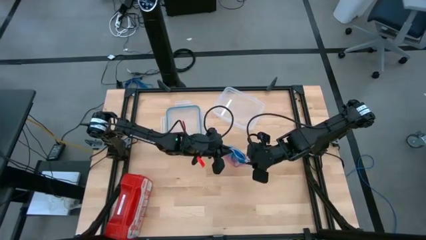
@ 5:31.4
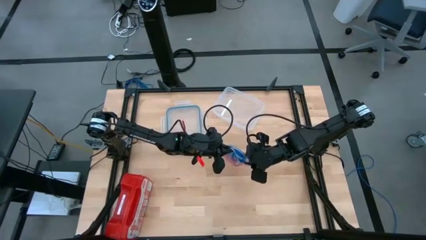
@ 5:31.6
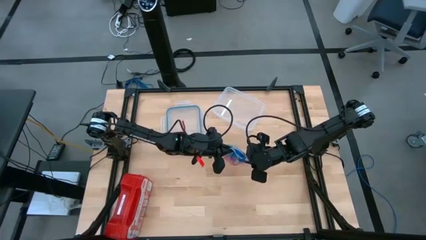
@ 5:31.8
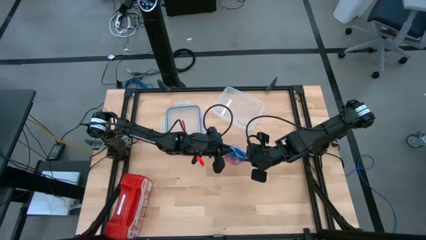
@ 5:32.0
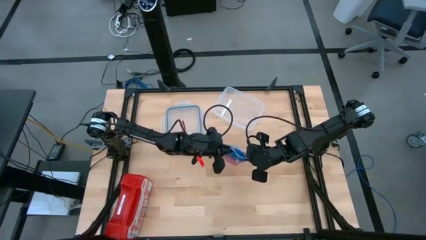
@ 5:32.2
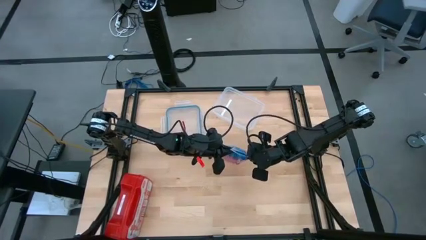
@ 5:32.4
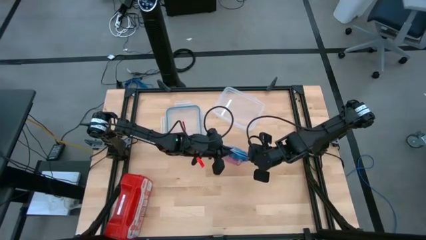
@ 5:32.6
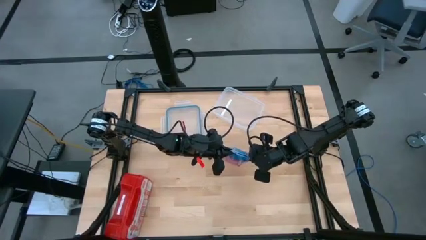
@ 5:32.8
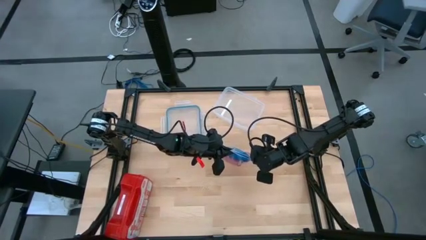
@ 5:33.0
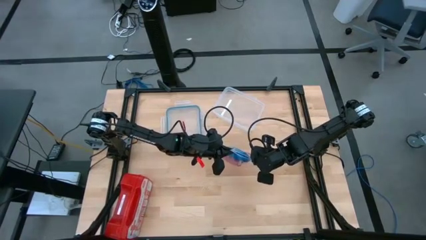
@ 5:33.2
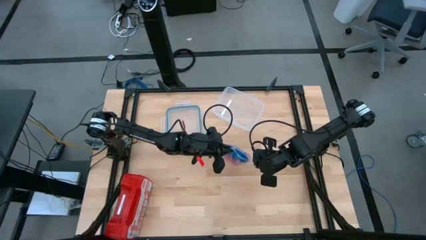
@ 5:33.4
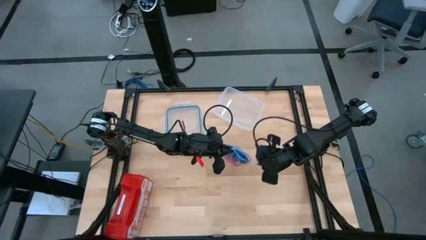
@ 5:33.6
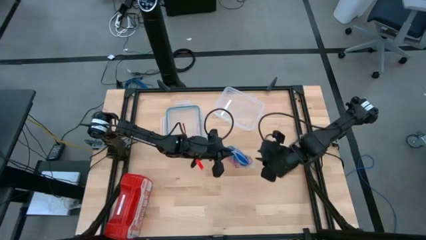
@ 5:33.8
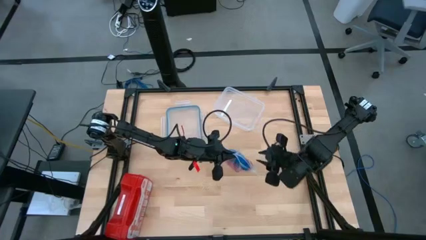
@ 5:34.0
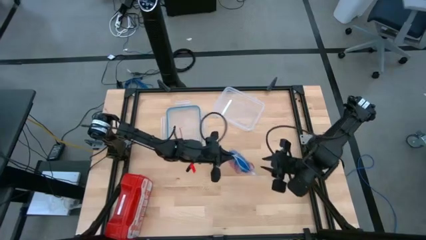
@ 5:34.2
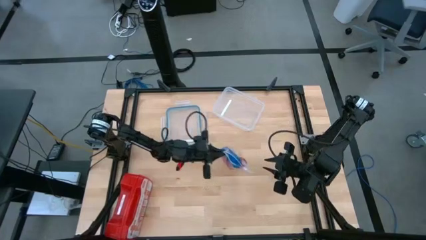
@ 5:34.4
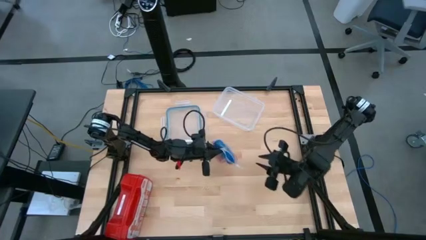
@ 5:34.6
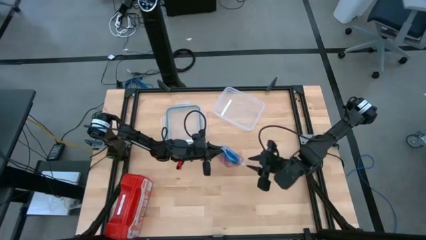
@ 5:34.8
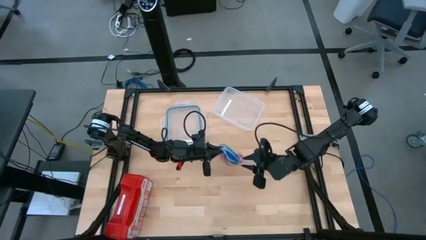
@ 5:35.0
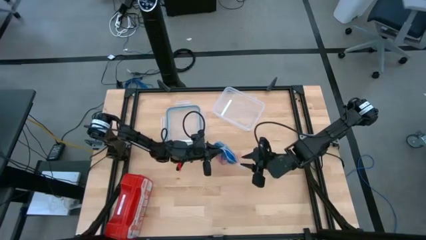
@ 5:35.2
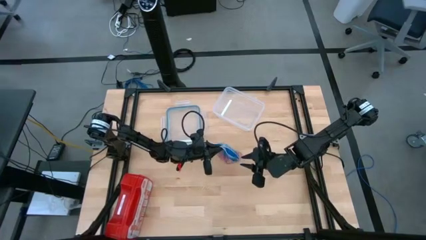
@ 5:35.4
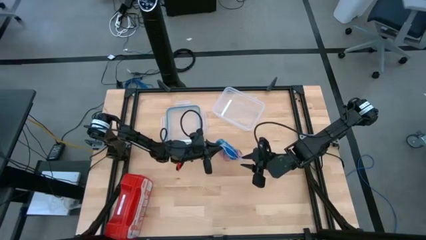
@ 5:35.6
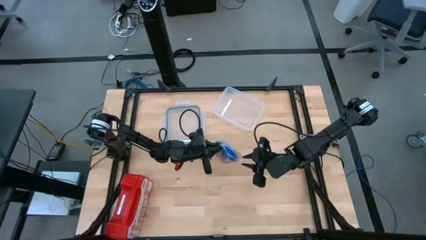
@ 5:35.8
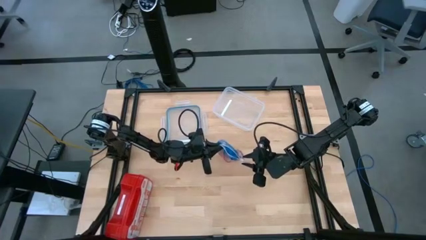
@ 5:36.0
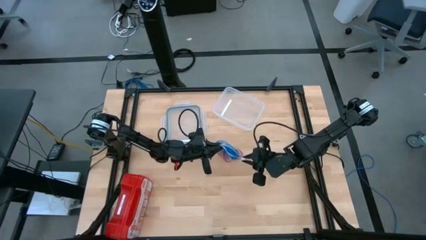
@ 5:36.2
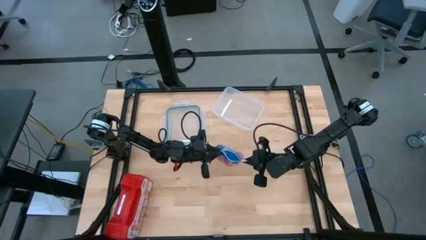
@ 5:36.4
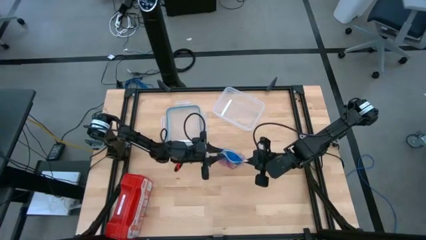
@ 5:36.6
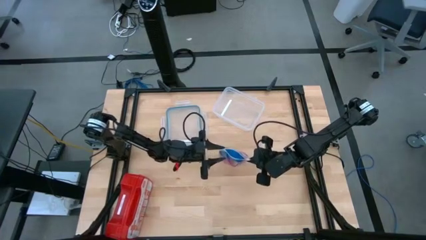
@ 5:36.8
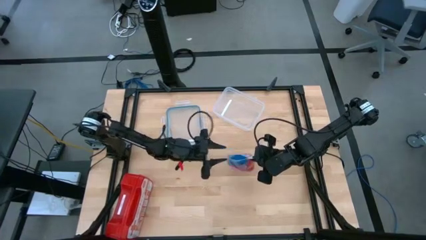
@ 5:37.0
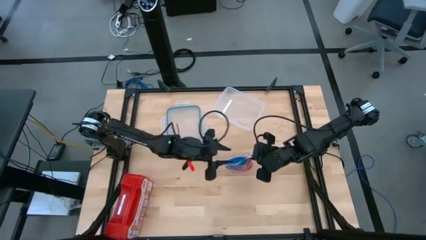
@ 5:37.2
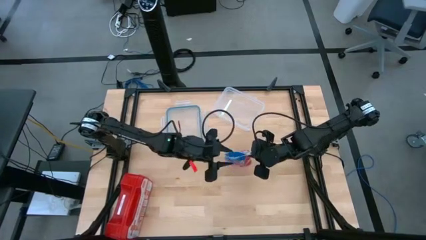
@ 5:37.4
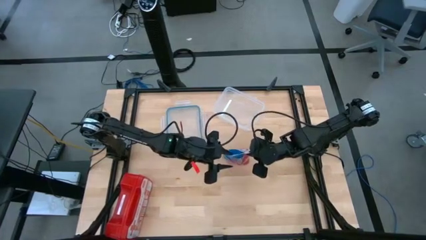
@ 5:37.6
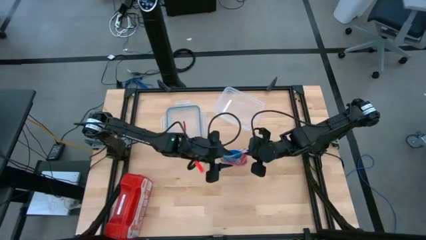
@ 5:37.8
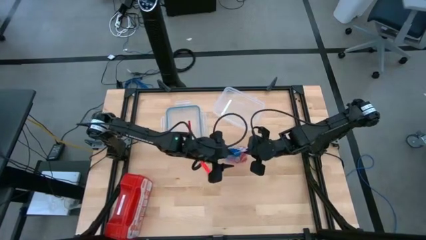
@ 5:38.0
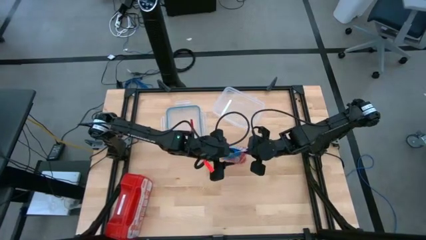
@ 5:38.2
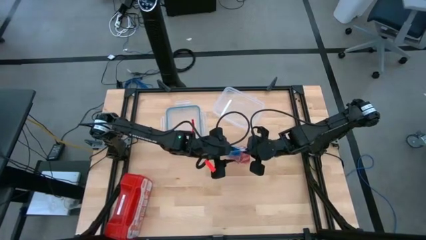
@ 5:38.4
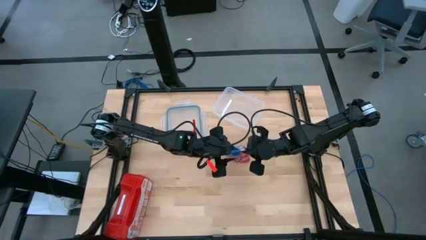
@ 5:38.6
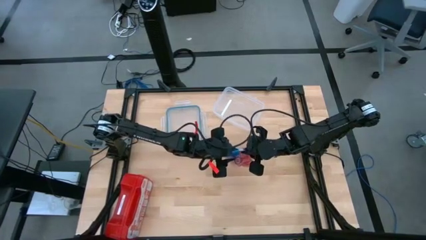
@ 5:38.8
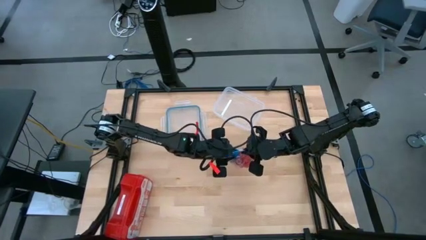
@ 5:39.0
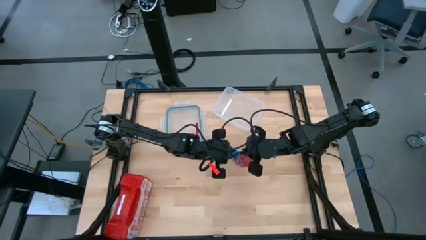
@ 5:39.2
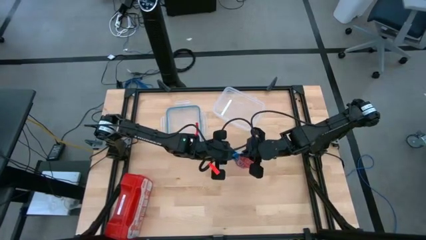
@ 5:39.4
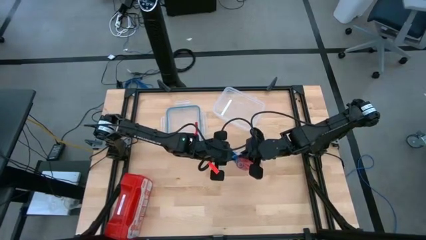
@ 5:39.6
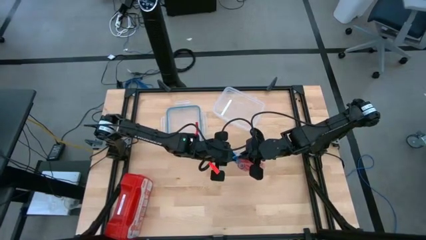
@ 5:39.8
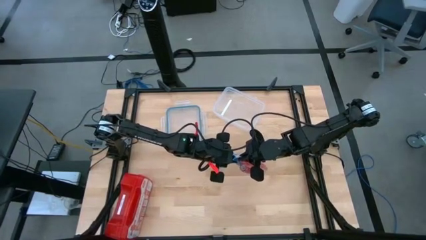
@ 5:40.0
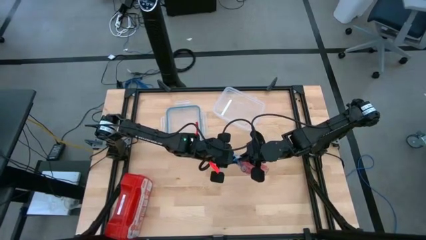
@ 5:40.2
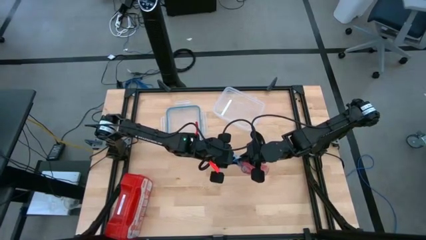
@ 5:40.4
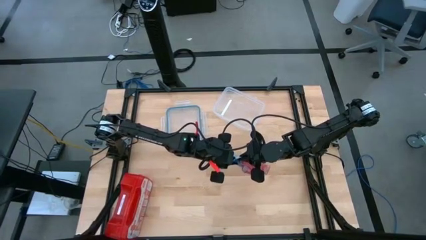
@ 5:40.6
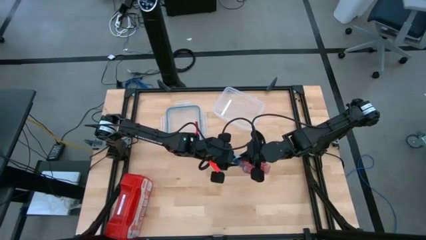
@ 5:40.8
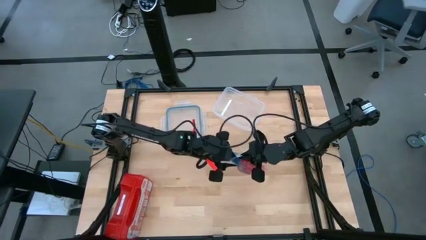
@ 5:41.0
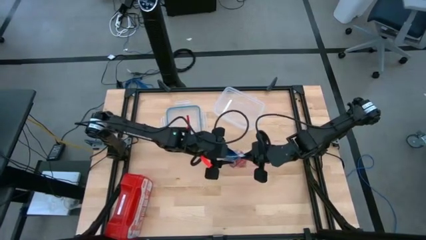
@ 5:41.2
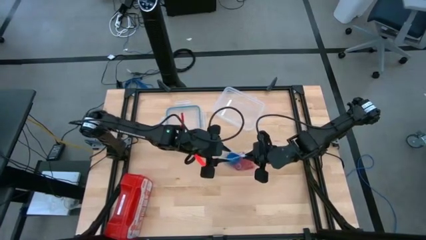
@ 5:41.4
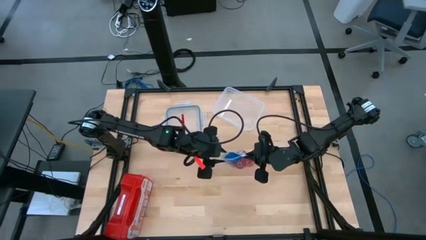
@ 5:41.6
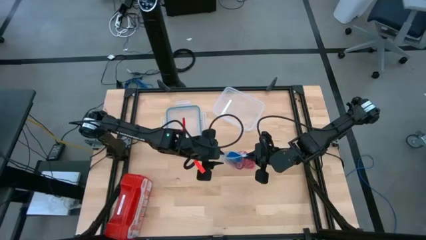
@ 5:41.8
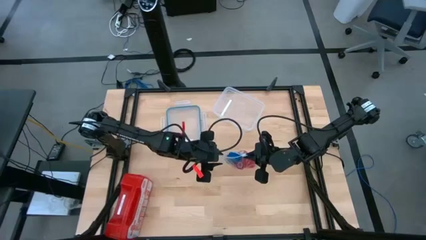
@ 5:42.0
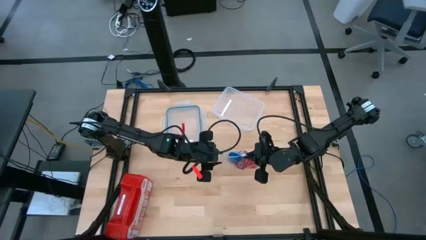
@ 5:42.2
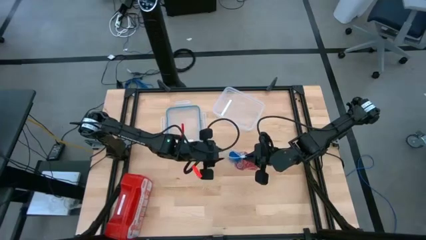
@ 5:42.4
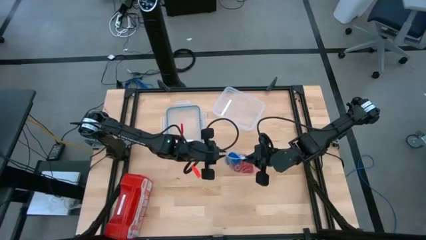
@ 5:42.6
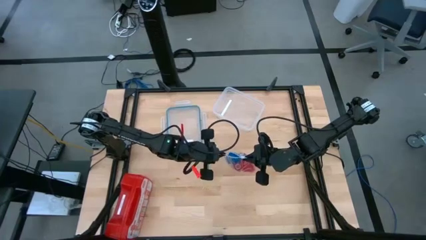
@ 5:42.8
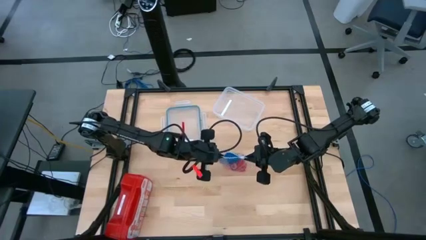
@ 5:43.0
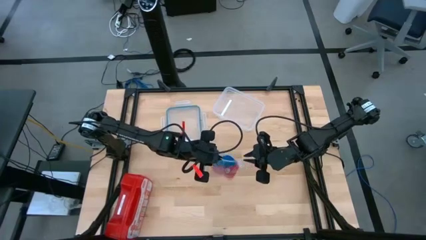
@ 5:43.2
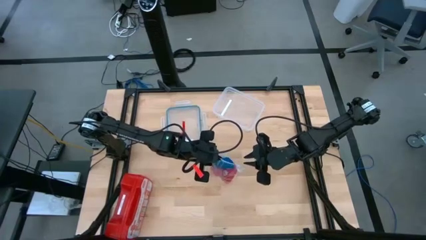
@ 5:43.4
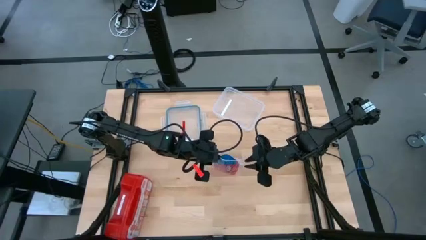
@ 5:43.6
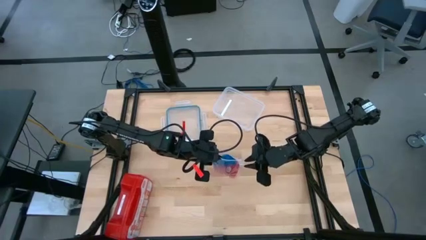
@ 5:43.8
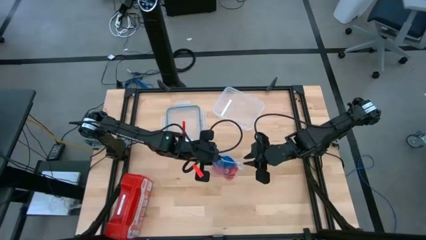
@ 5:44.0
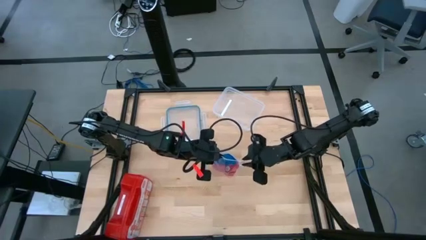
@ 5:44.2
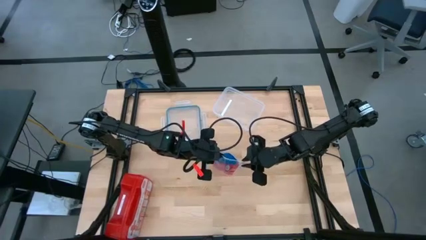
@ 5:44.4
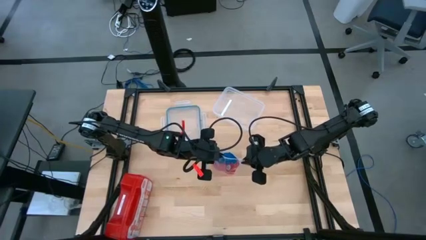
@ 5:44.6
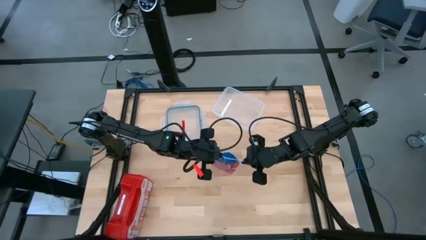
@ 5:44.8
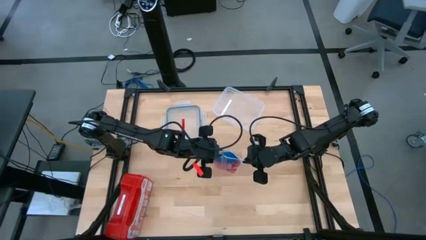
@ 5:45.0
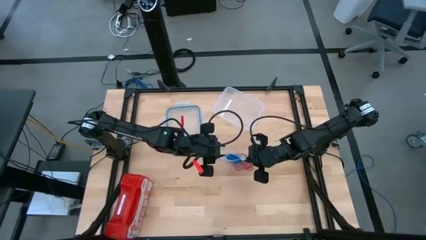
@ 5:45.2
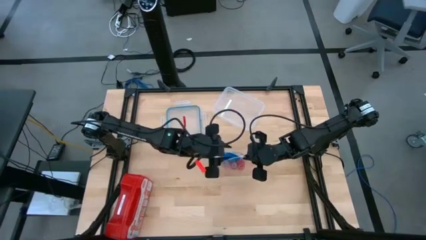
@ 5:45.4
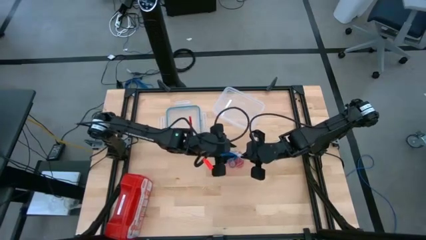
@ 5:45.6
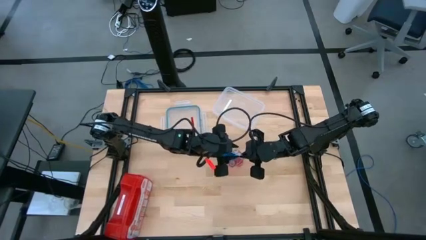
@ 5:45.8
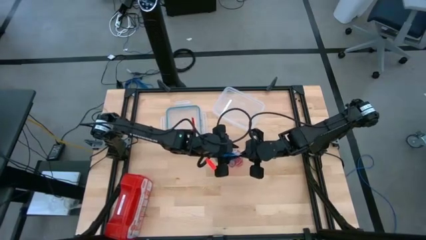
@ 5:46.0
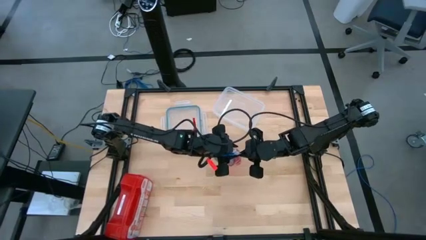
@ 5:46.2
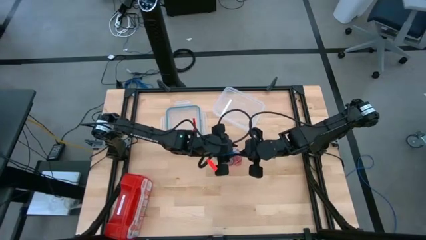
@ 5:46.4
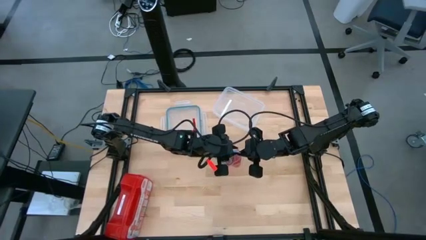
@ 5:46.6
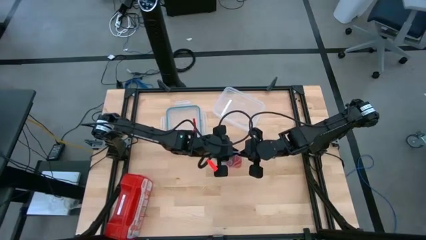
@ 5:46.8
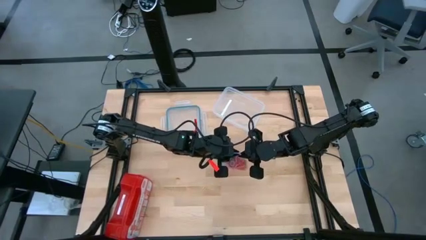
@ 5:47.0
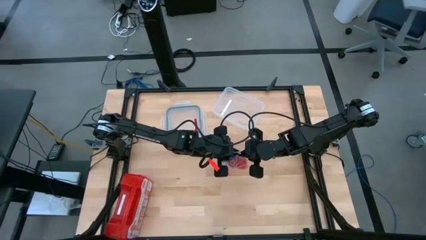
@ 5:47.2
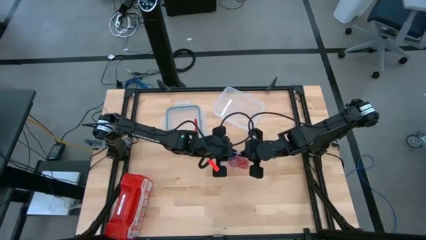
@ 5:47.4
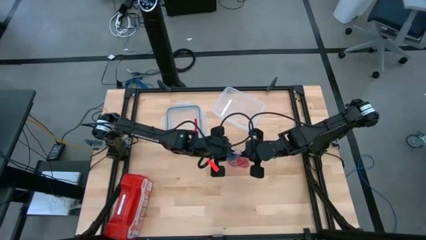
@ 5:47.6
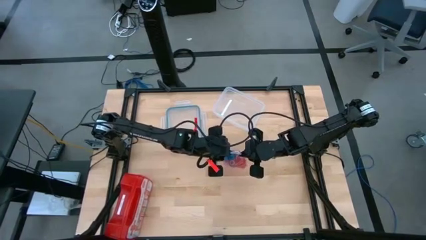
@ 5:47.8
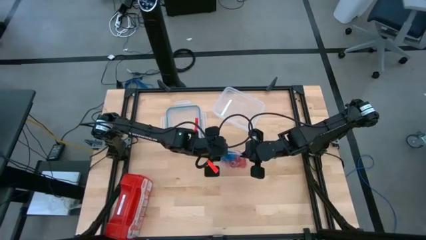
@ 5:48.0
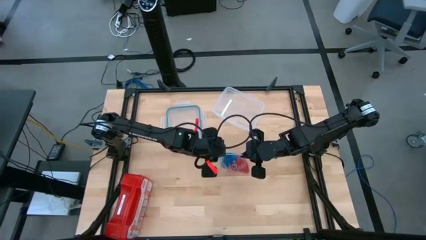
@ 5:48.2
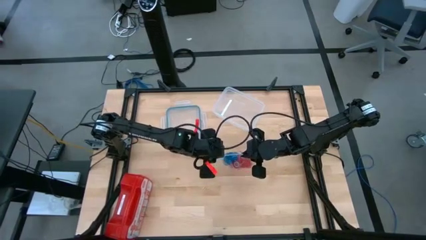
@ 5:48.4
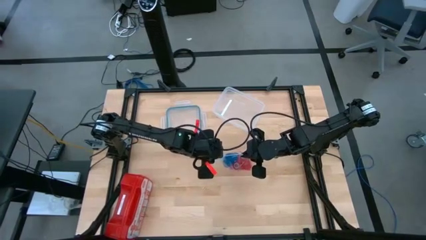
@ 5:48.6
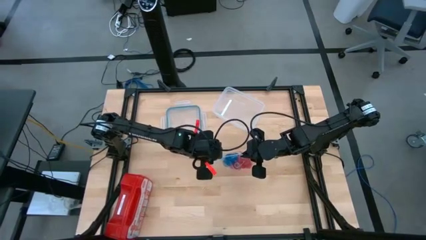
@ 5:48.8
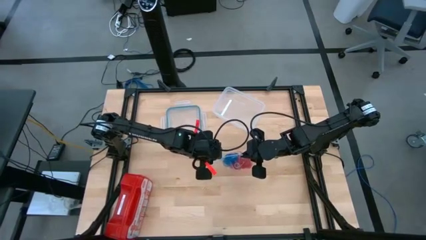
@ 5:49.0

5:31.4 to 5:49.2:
Task: Roll bandage
Close the transparent zip bag
